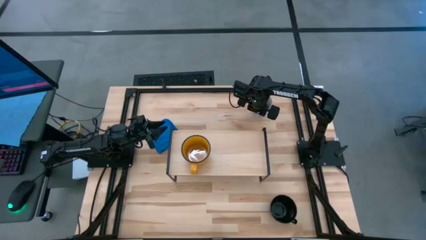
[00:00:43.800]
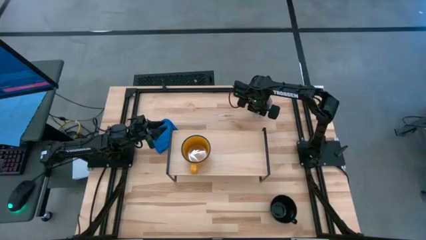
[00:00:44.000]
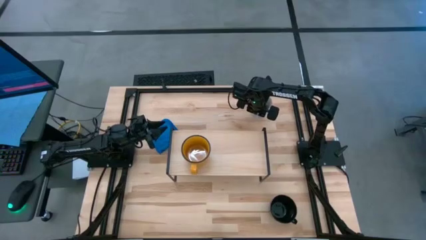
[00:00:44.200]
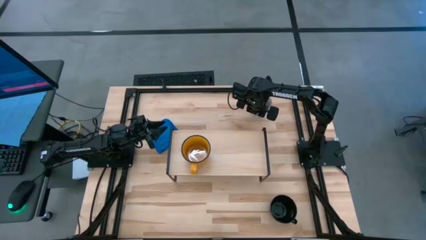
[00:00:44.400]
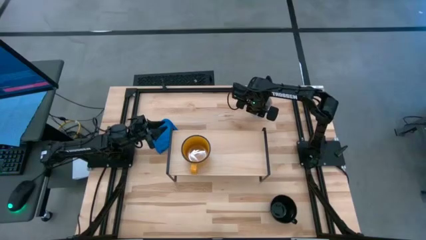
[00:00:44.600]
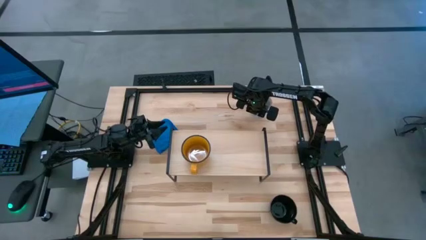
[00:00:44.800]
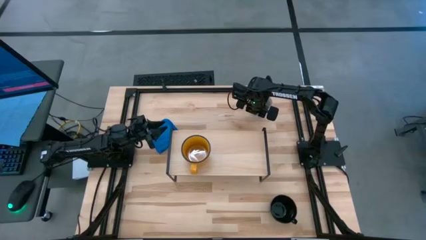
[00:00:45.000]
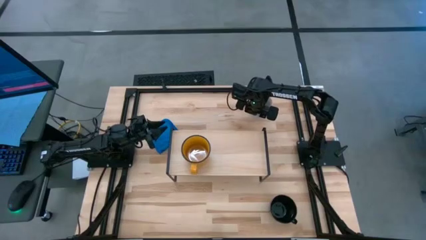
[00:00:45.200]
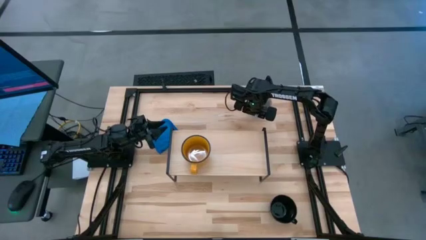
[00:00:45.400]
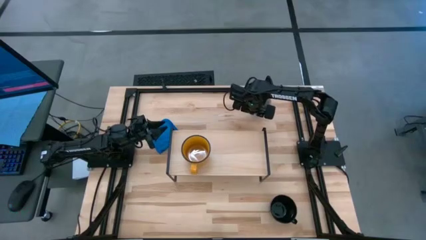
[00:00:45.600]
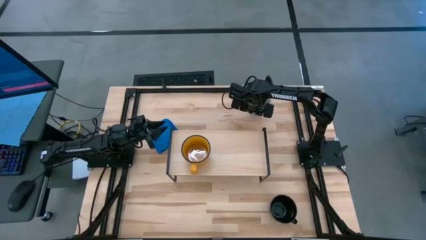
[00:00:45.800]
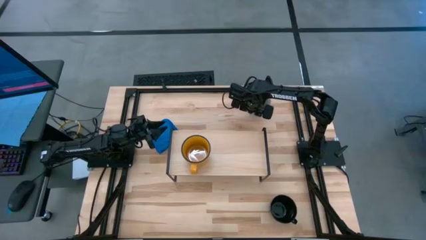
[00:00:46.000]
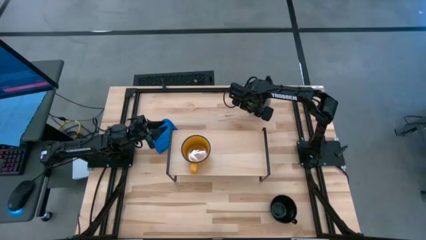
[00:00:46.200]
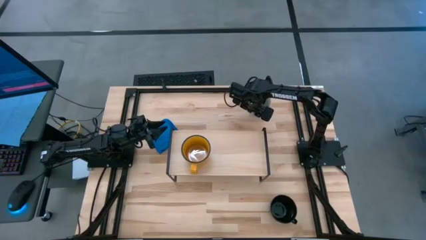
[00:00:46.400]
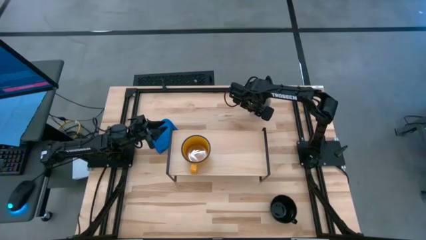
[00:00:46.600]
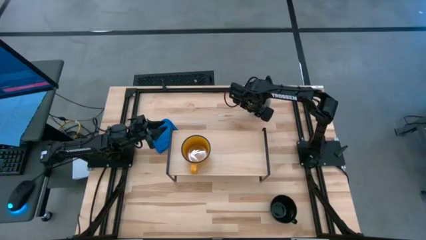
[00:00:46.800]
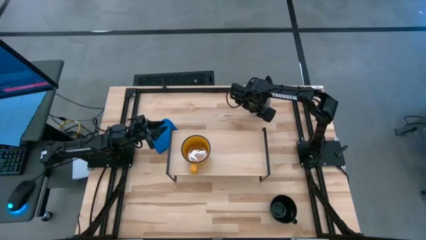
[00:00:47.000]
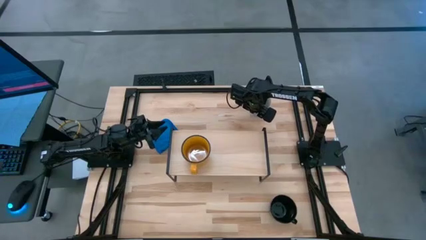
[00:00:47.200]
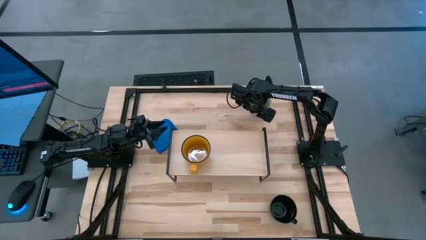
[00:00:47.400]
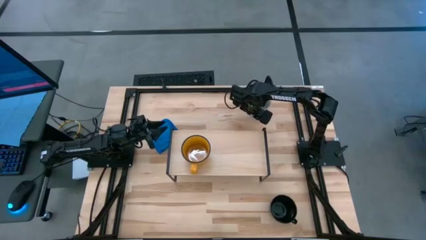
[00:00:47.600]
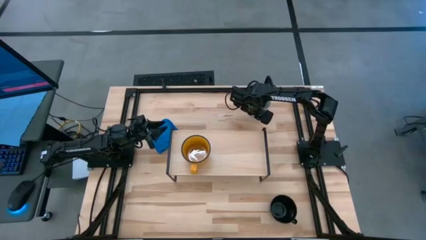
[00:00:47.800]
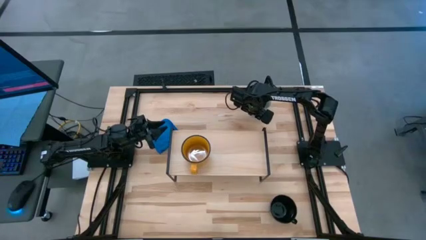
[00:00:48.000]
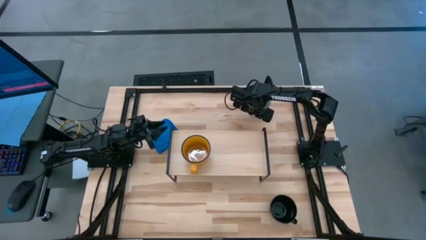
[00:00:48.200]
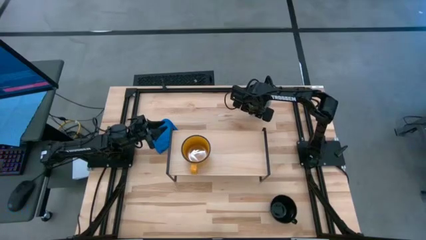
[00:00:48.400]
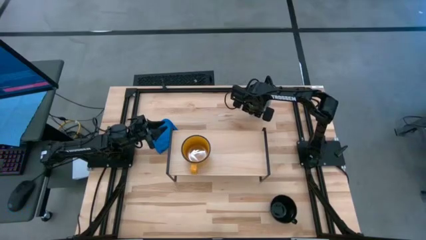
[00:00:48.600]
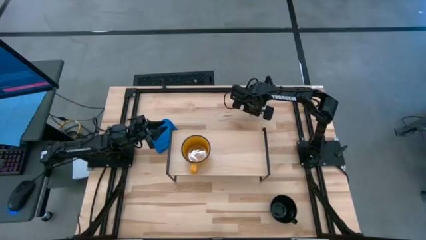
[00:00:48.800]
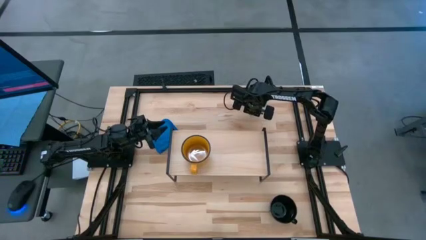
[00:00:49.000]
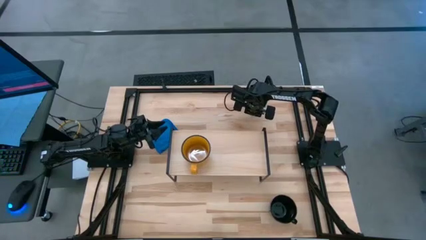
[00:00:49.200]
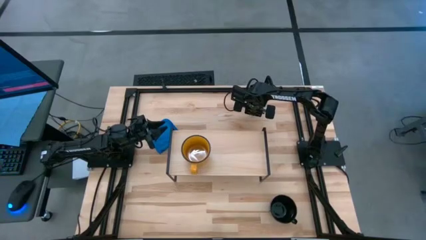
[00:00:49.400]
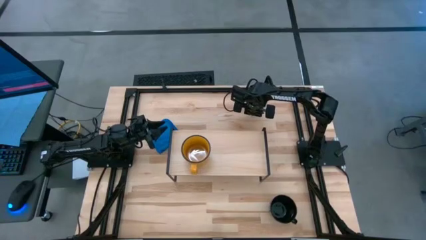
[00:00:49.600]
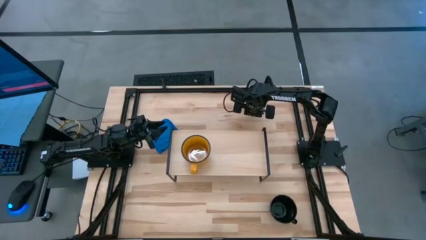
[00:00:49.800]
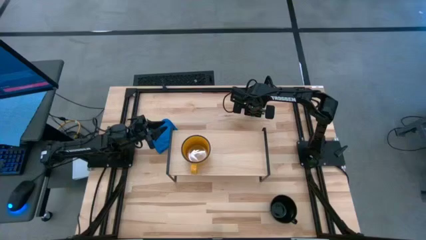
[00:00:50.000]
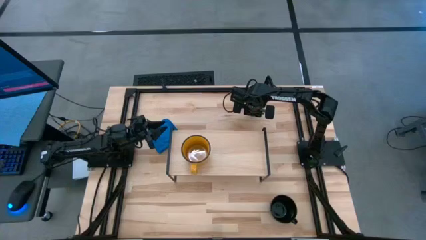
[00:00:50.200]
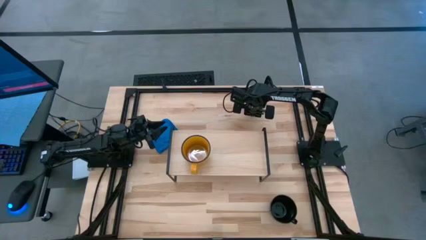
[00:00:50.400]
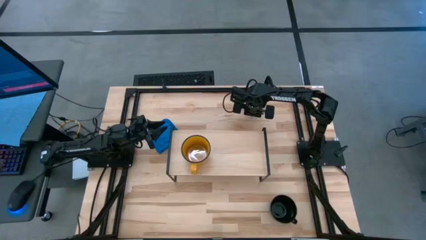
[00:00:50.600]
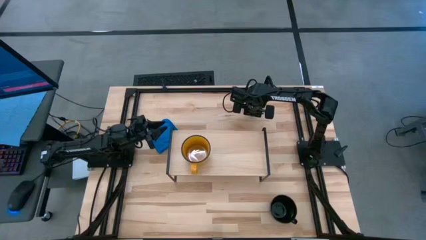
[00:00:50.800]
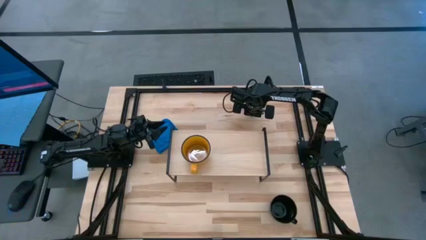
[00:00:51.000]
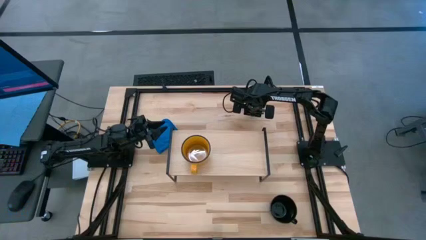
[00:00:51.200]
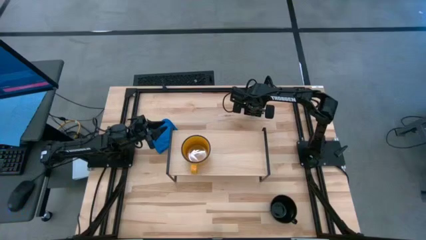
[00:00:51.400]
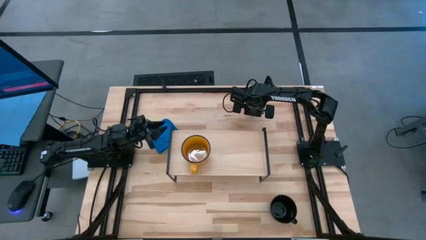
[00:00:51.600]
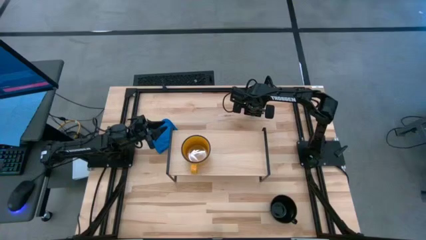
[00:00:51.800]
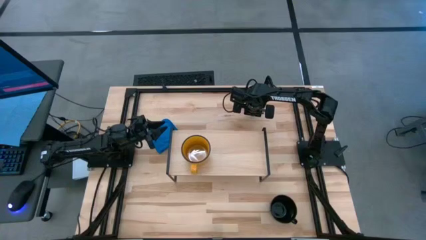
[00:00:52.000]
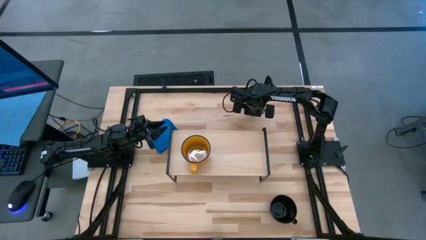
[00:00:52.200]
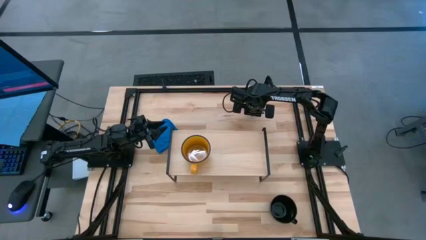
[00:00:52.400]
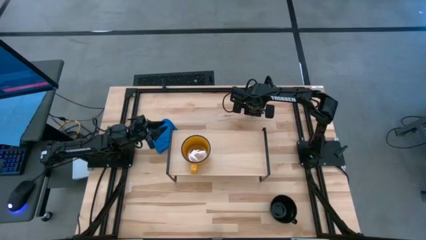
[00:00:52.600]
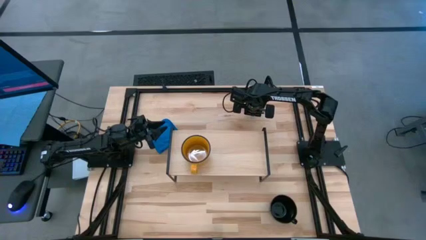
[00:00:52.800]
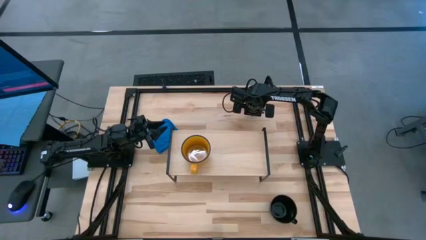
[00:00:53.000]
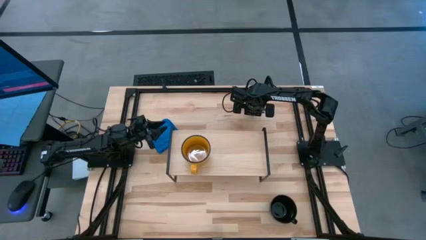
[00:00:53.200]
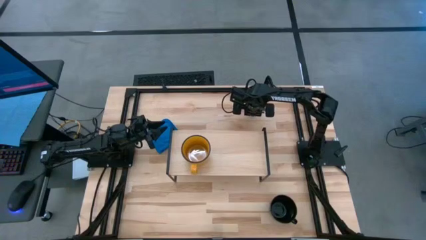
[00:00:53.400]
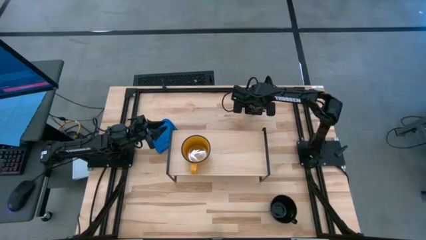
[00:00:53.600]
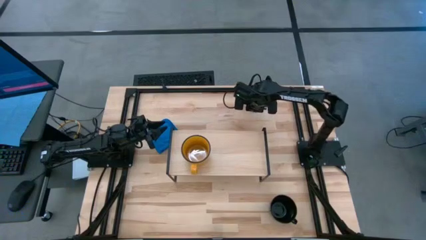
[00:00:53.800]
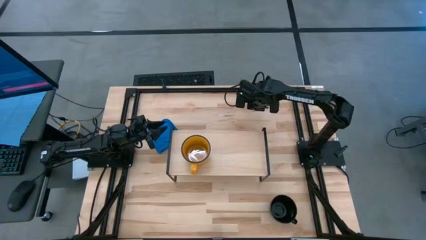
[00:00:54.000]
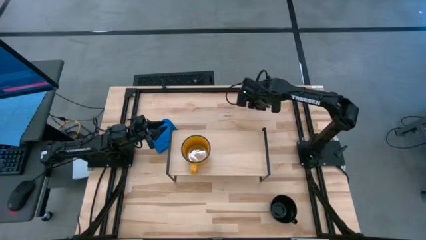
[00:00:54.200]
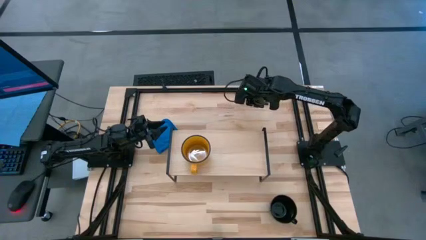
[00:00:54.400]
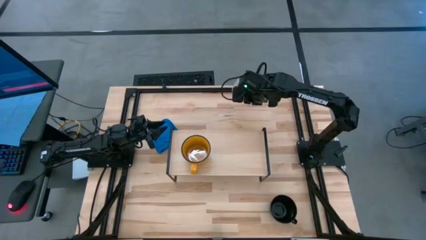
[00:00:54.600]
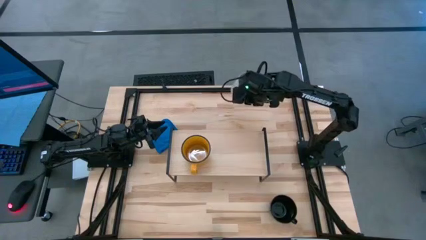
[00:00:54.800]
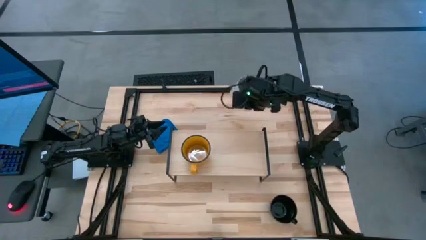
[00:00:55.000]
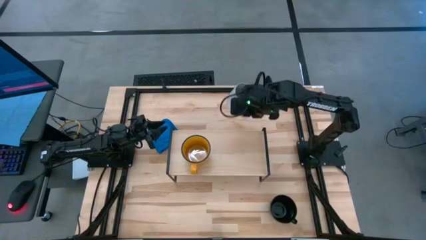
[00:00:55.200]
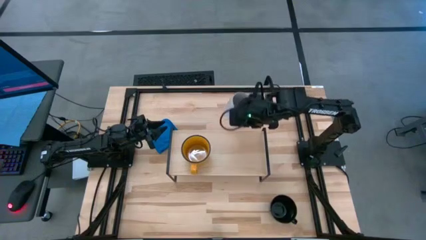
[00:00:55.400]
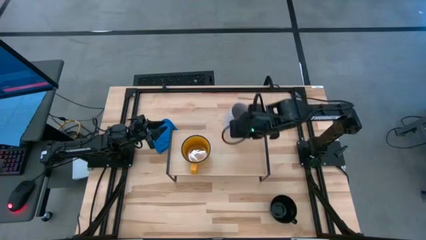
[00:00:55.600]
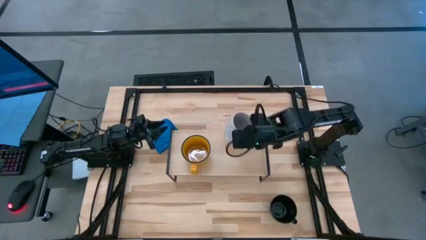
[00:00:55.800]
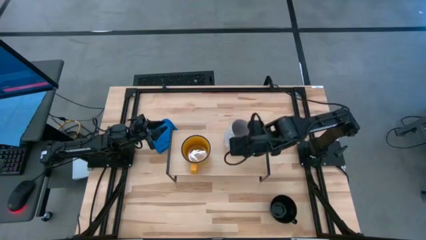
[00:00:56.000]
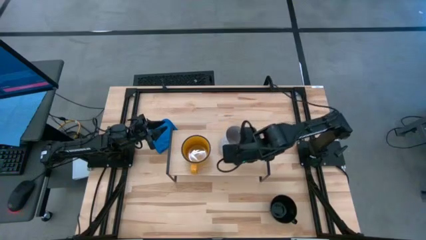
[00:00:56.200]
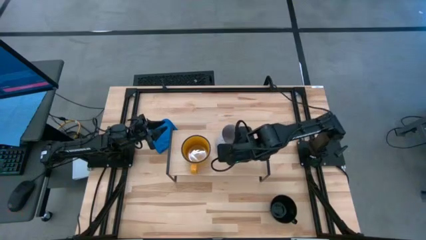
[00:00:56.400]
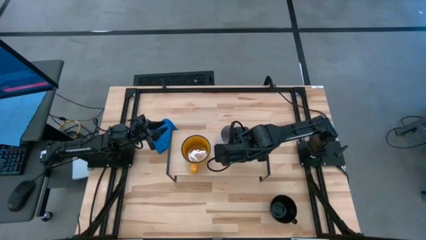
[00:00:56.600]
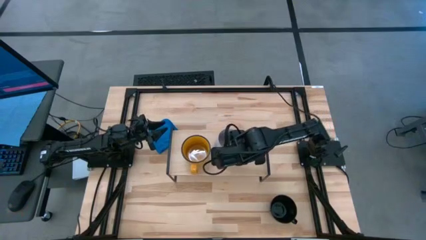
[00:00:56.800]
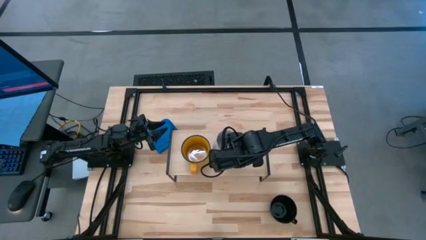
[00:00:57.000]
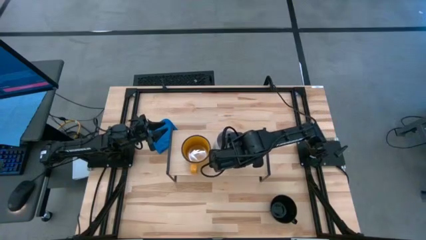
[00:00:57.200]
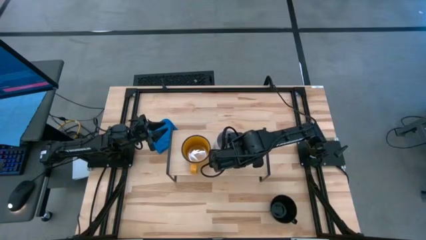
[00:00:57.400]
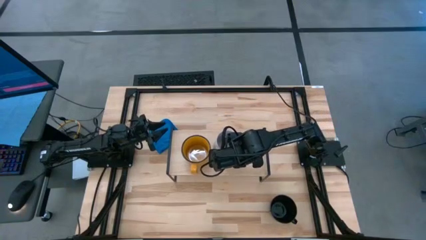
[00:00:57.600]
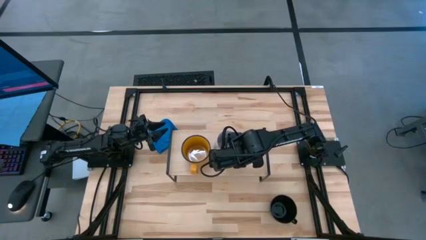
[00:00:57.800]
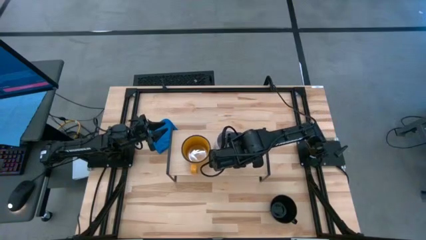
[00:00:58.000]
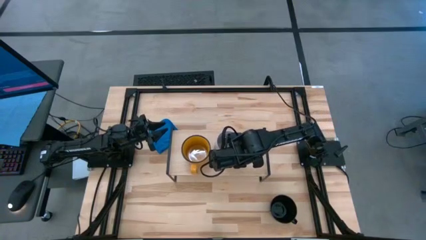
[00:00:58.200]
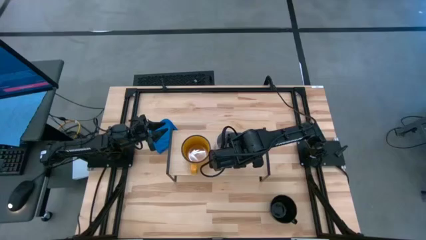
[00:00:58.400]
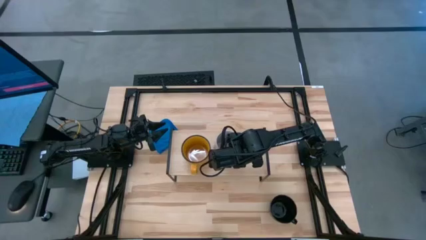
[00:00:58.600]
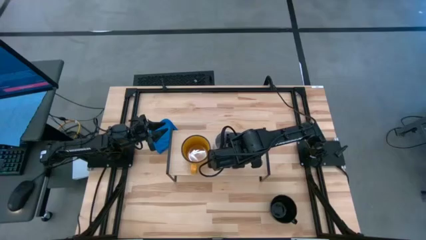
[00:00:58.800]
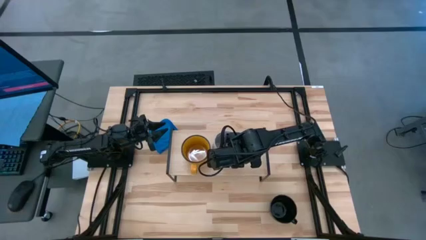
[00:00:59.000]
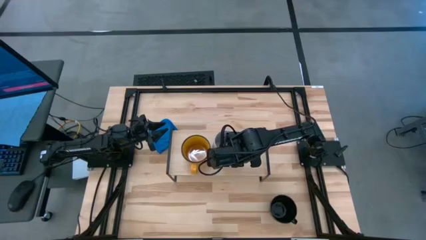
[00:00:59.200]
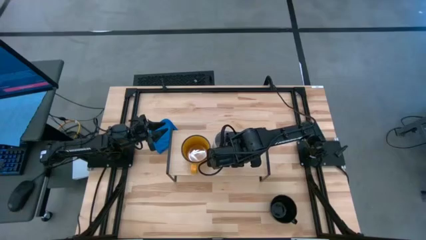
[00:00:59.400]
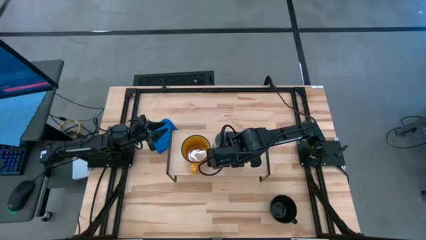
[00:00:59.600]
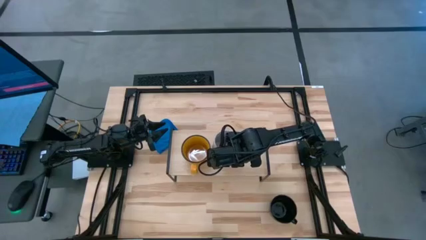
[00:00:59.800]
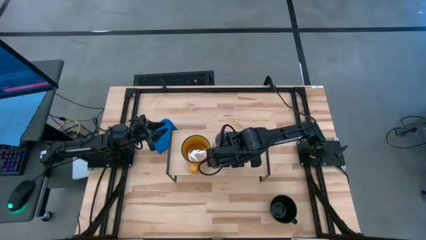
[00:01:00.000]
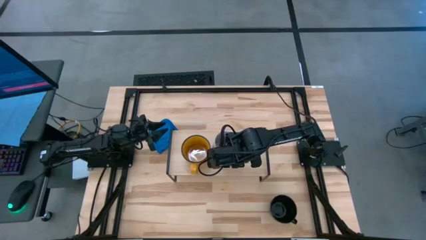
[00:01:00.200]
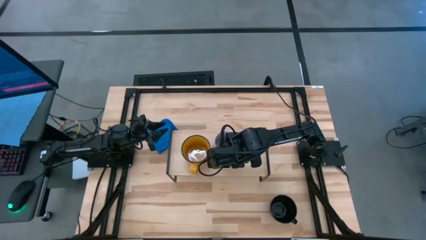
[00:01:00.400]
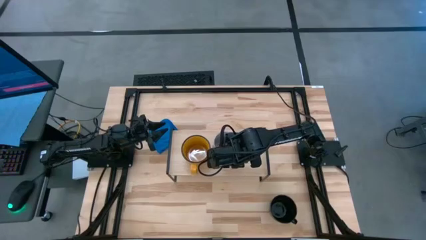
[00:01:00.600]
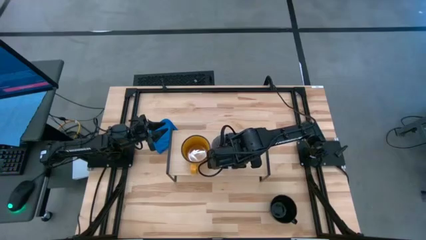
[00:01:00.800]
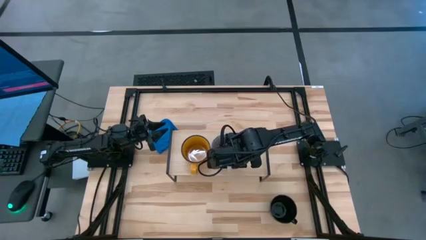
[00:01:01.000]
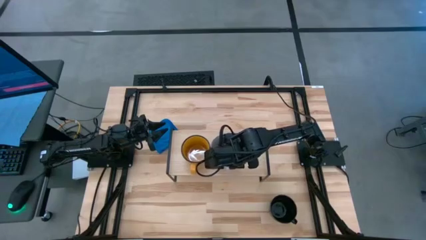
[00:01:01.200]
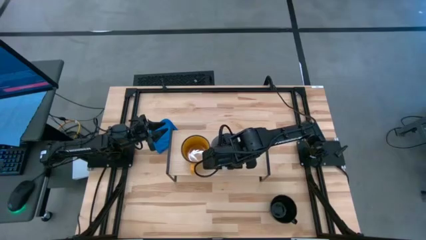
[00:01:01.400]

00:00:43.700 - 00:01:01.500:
Task: Stack small to large cups/mugs on shelf
Put the gray cup on the shelf
